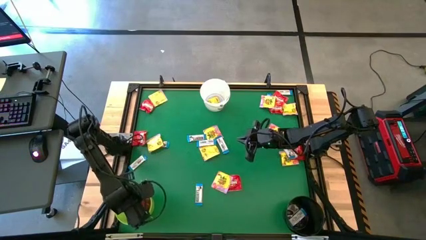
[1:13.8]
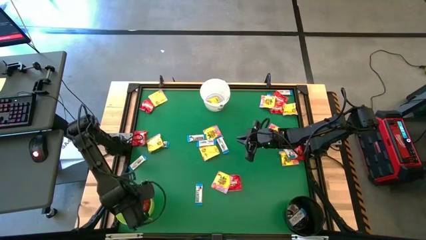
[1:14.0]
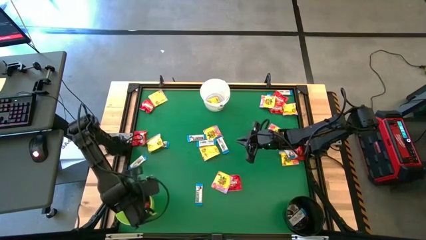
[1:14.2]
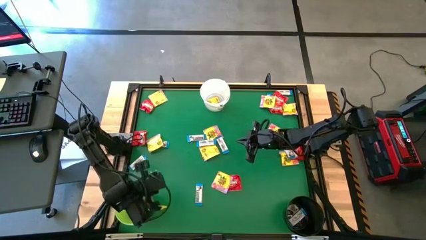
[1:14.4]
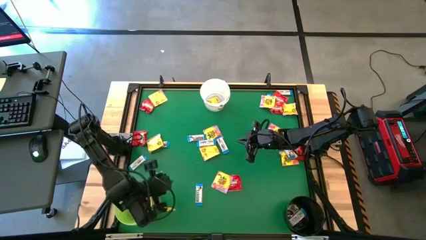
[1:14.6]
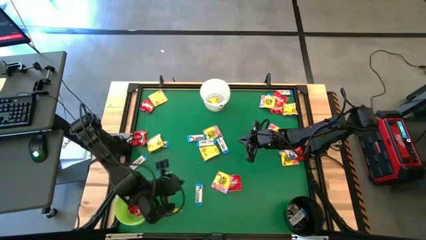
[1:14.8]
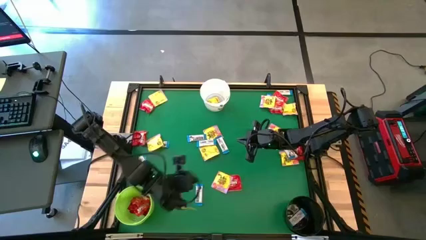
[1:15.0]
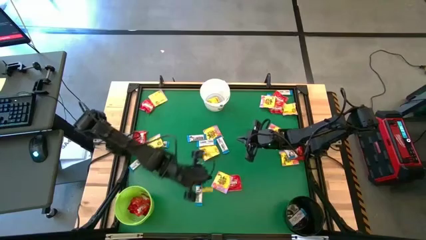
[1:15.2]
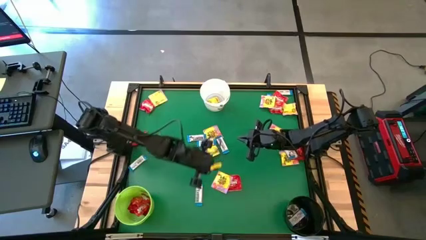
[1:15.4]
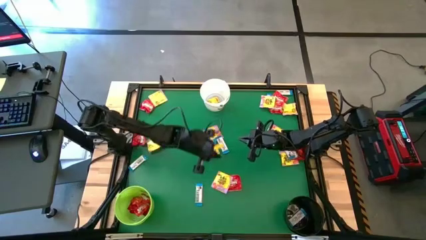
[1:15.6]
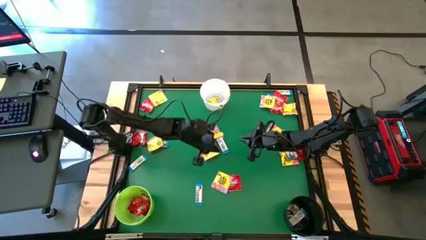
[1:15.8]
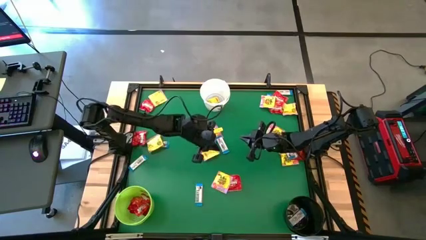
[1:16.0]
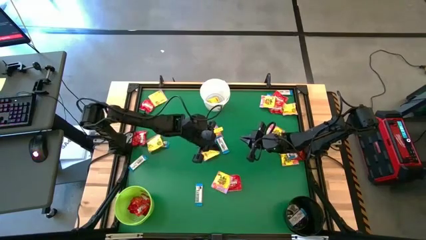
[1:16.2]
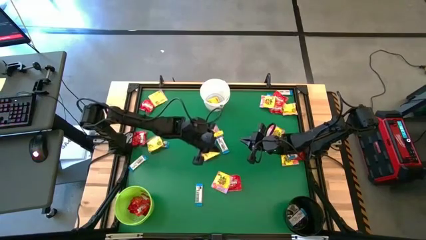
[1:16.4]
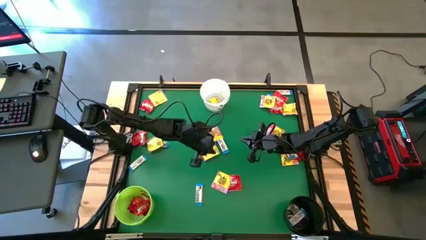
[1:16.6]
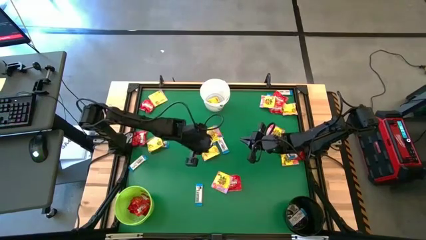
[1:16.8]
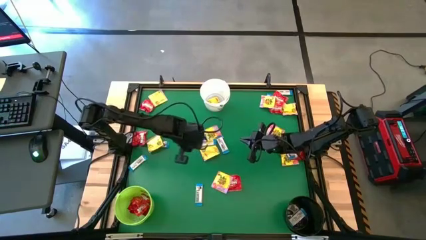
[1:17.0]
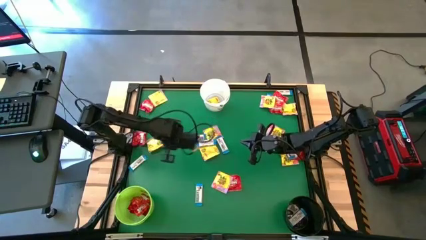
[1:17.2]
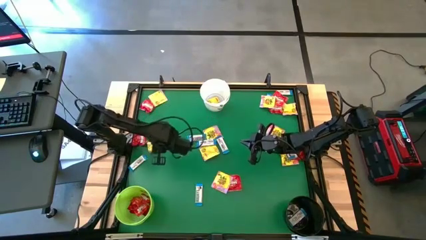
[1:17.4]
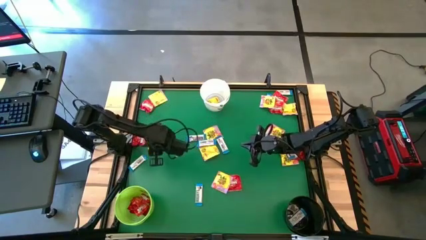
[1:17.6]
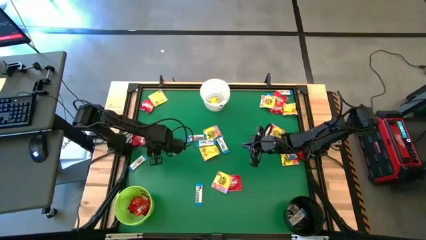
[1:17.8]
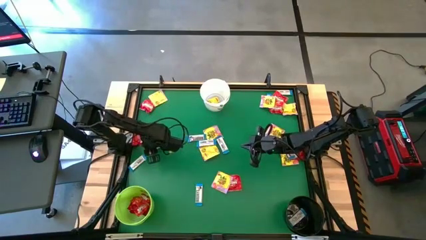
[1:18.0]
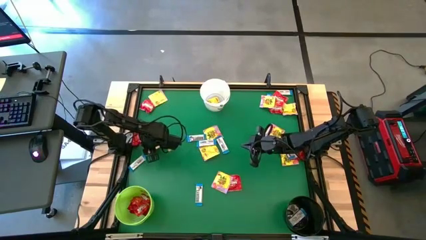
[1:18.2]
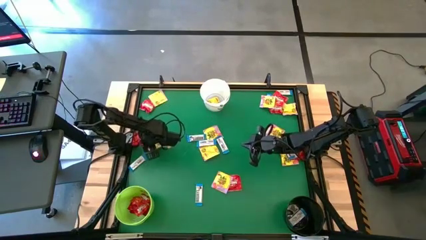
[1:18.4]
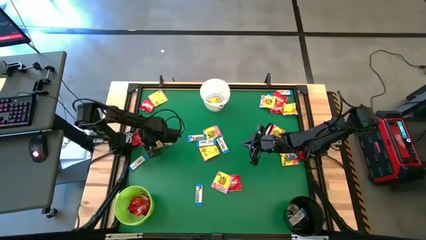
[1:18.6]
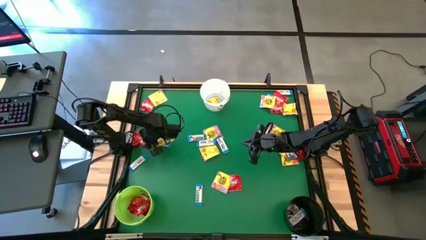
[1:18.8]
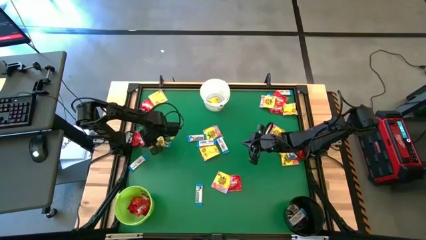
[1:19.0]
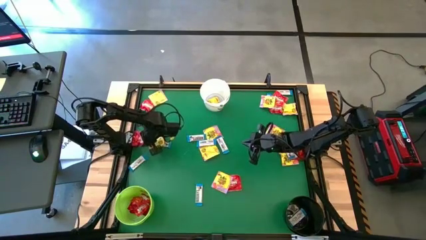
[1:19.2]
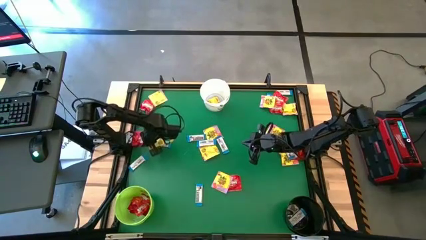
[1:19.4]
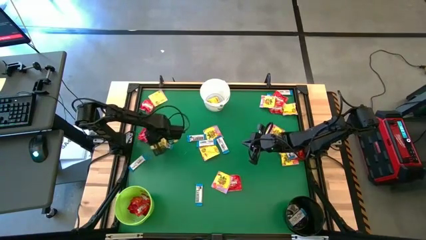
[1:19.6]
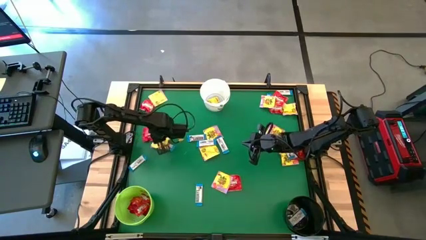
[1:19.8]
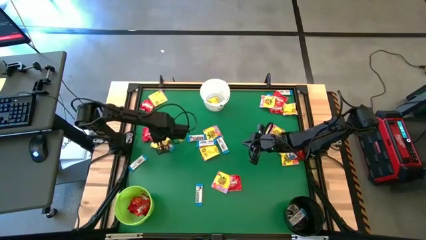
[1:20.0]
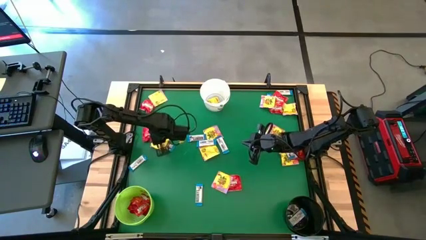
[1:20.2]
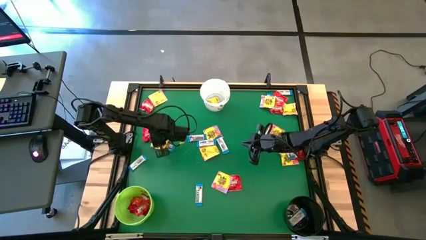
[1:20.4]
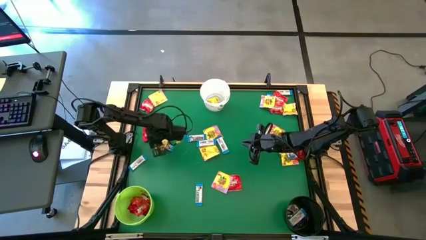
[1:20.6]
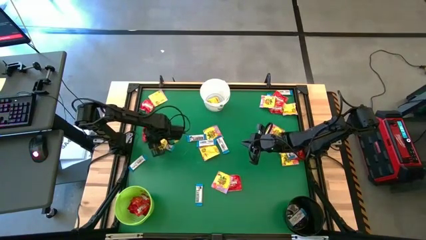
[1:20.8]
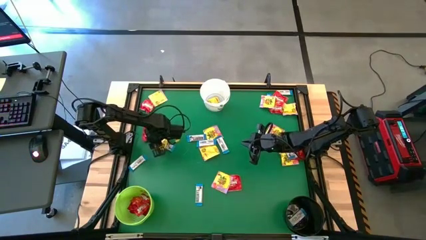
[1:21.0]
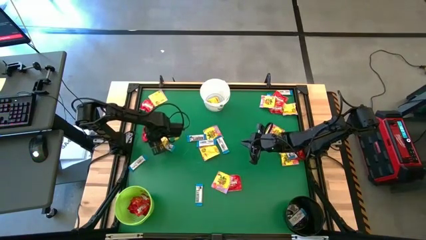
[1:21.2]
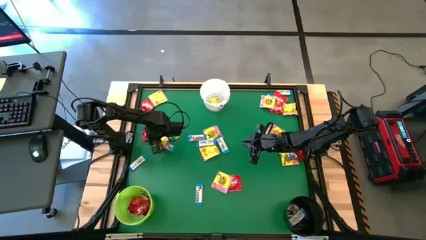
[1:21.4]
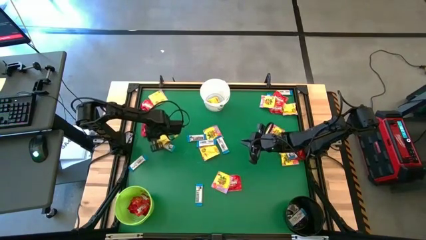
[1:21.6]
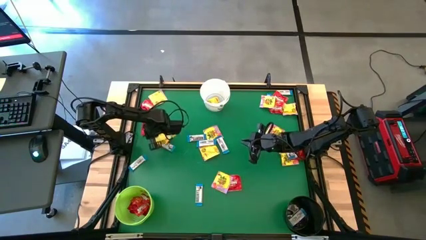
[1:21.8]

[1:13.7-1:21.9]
Task: Sort candy by brand, put in halloween buckets
Put the red candy into the green bucket

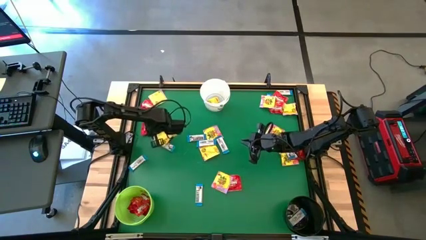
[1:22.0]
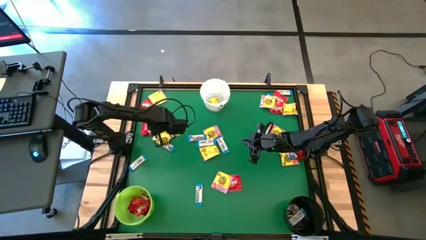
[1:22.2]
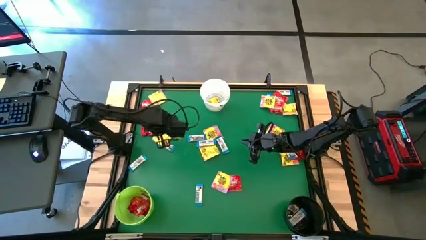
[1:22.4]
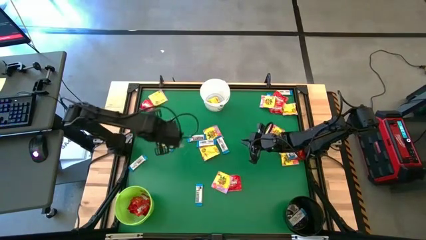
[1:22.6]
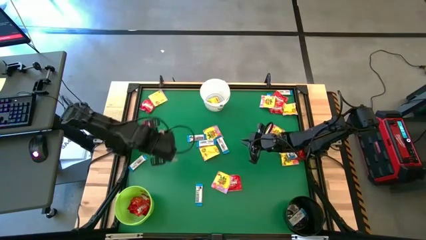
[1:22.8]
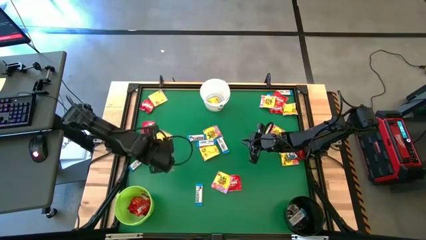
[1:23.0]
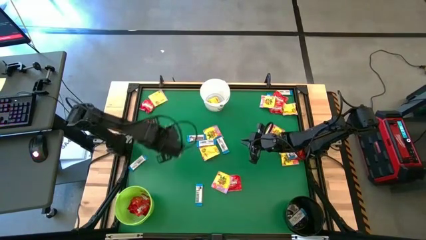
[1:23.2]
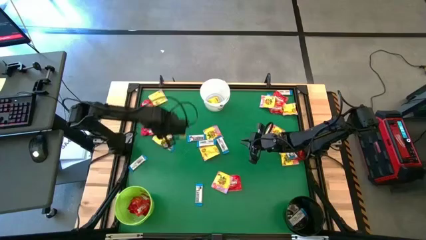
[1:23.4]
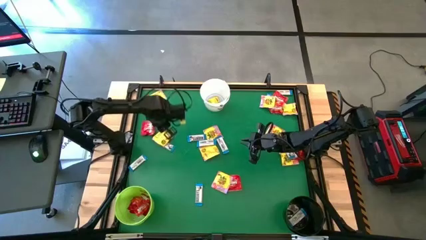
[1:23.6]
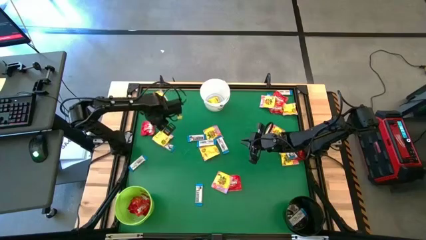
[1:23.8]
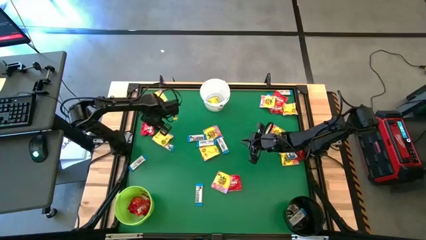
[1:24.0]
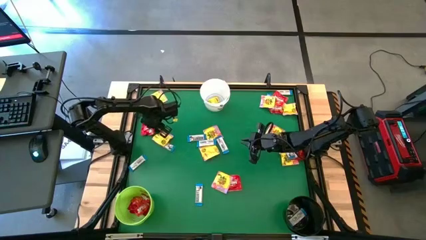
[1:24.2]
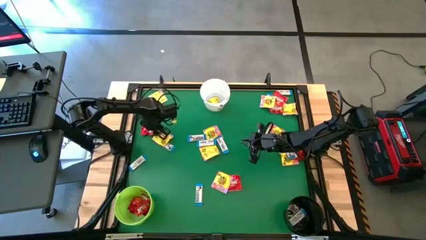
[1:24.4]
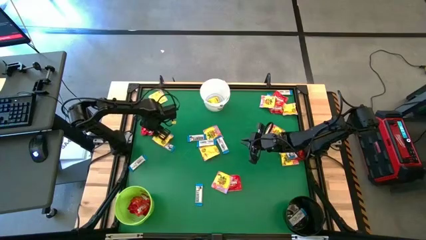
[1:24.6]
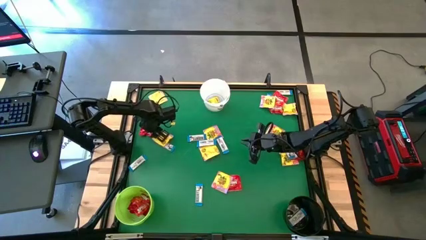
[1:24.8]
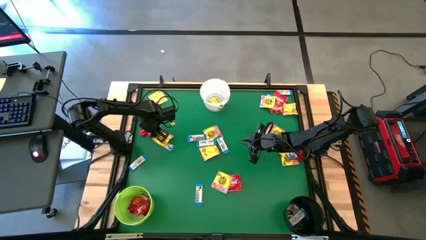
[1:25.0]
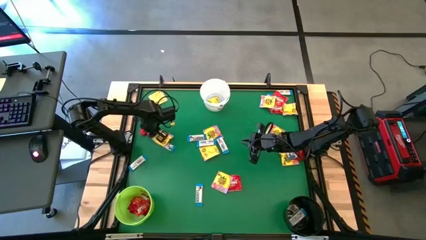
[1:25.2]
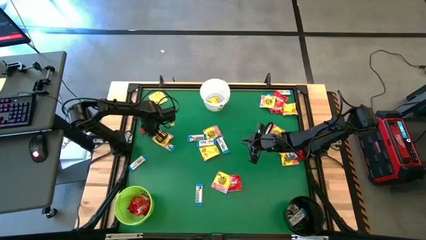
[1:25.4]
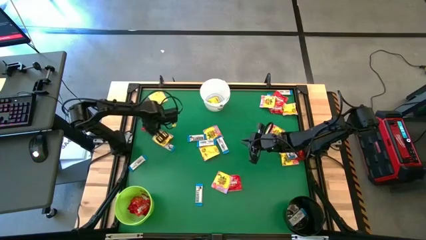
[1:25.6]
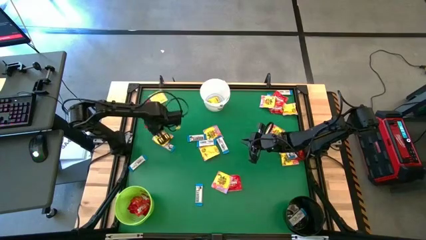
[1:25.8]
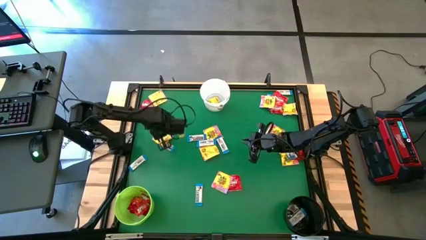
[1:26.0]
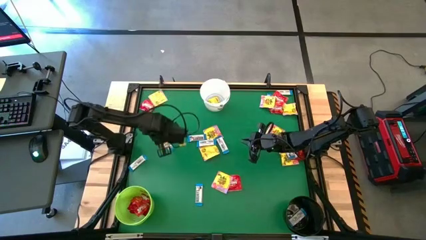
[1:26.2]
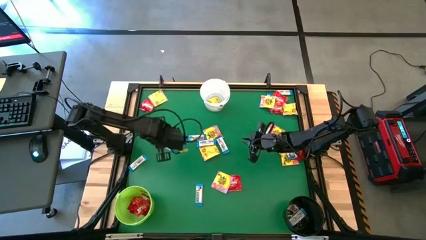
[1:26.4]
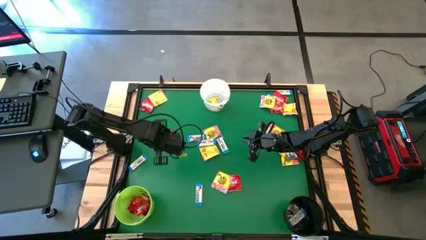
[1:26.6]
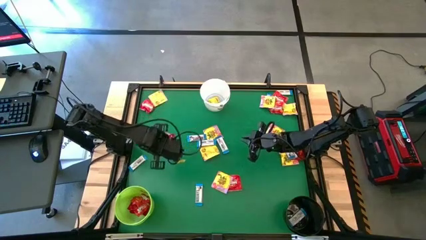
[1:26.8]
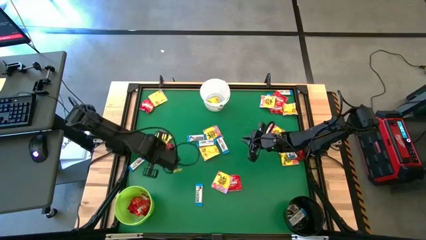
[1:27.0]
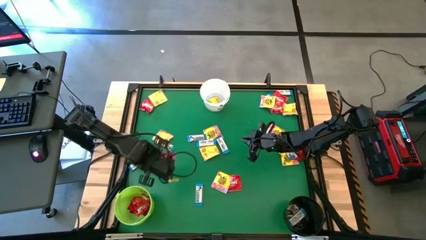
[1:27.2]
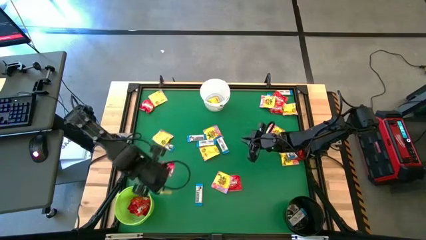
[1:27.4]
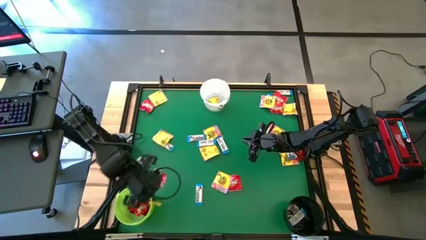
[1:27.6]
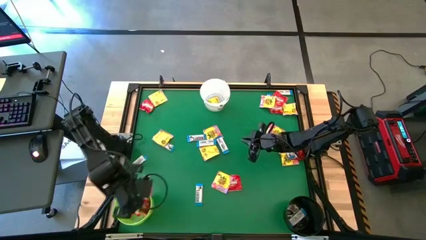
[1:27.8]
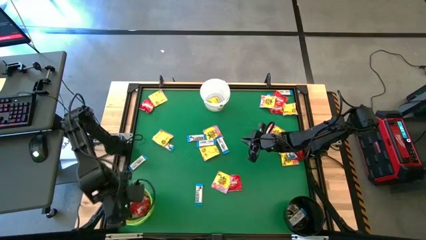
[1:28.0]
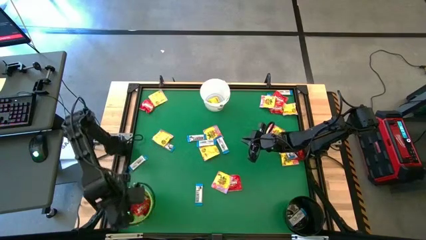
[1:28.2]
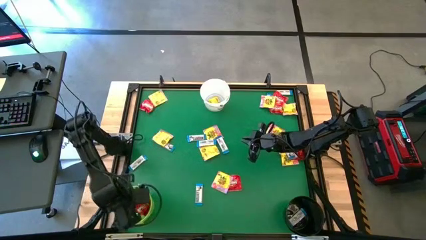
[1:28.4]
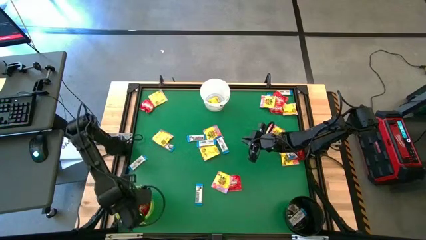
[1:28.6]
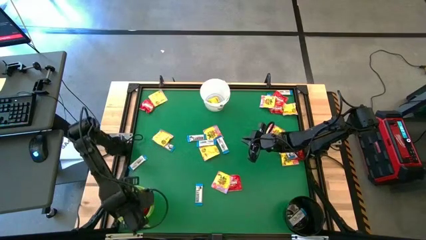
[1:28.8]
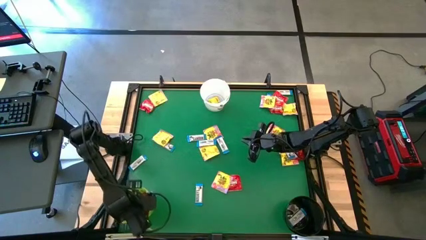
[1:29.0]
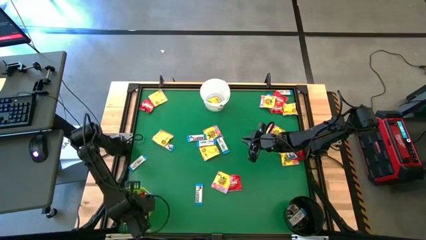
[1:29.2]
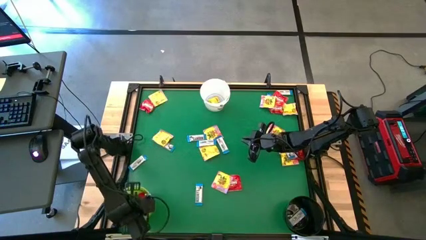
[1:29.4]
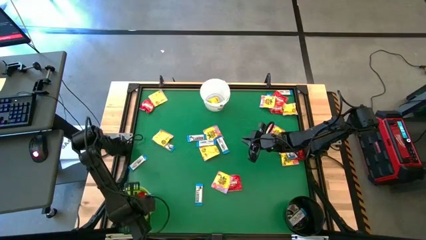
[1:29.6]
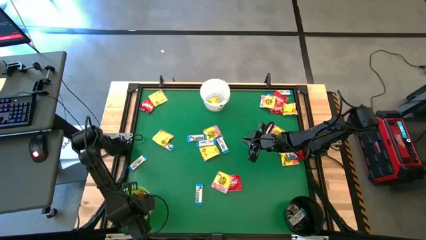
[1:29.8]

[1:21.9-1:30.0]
Put the red candy into the green bucket

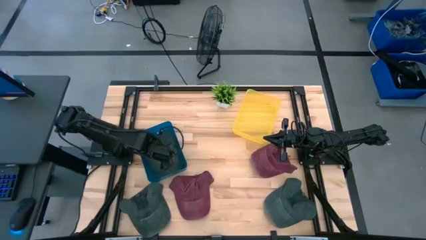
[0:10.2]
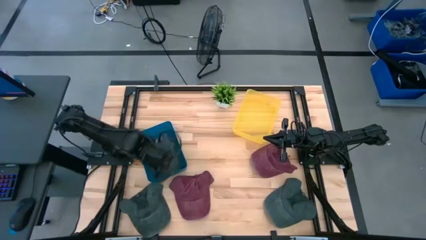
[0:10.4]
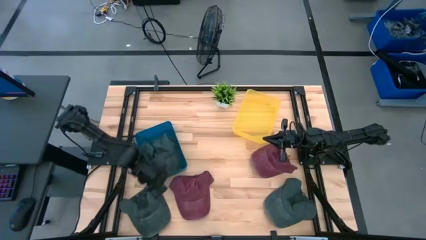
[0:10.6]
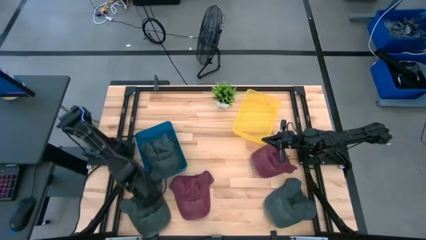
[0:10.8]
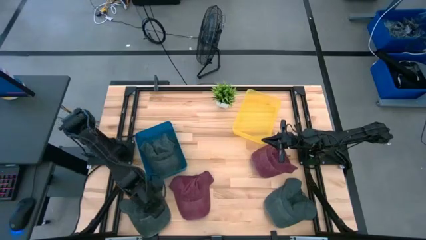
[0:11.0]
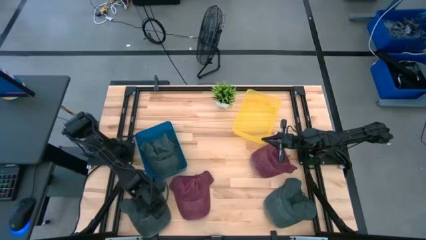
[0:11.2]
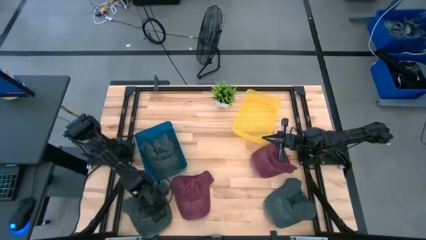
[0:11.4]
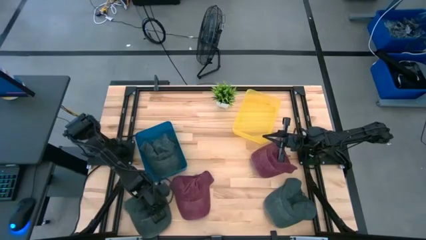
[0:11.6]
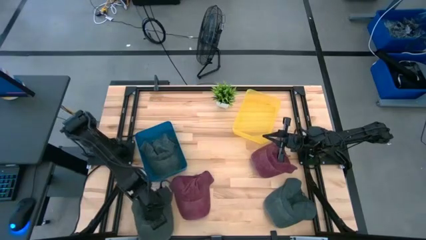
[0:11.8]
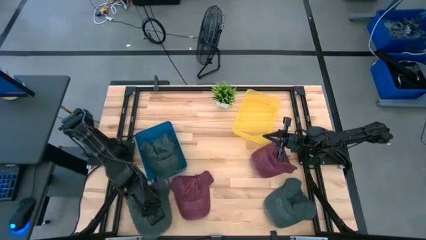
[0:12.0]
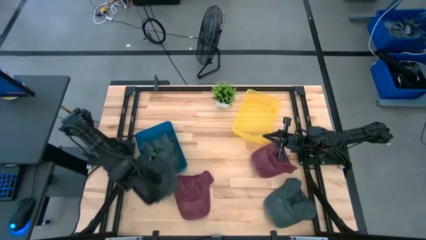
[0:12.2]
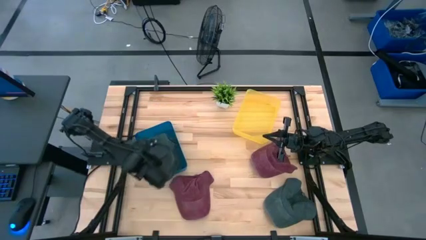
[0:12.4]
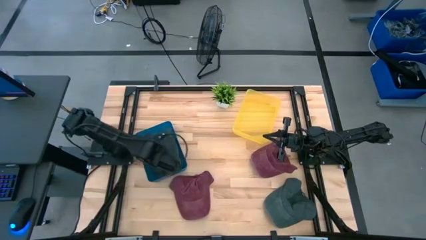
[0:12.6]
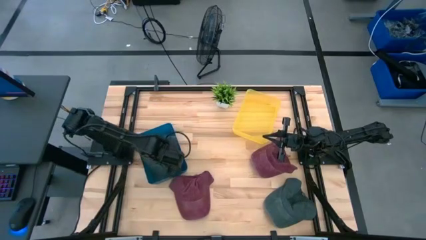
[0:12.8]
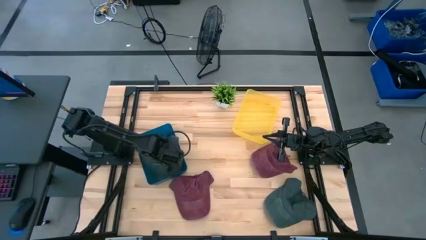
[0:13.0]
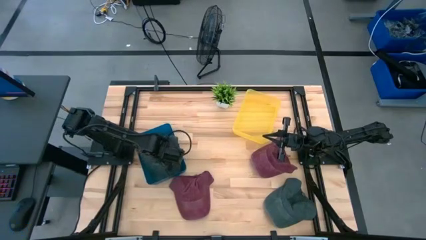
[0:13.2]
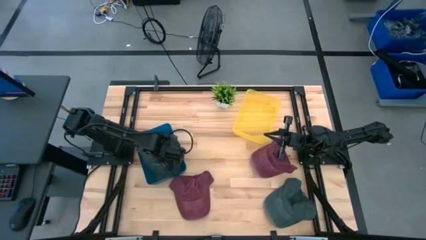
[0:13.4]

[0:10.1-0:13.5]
Task: Pick & Place hat
Put the left gray cap into the blue bin
